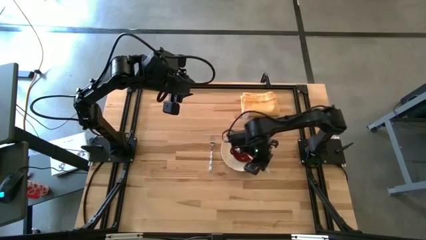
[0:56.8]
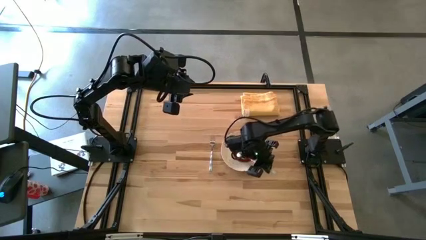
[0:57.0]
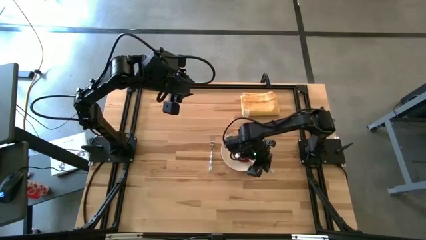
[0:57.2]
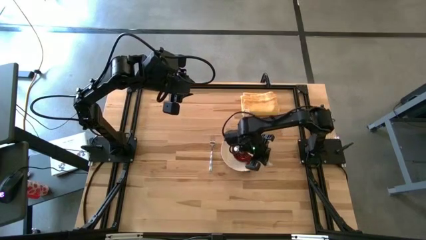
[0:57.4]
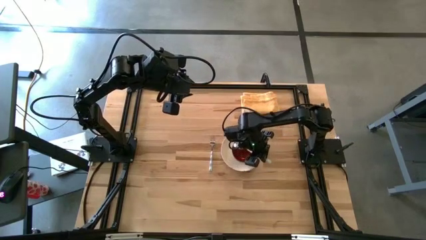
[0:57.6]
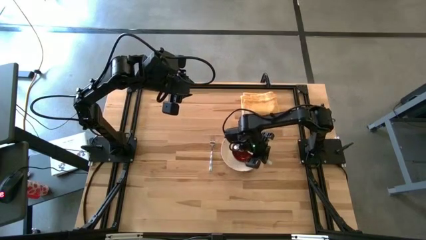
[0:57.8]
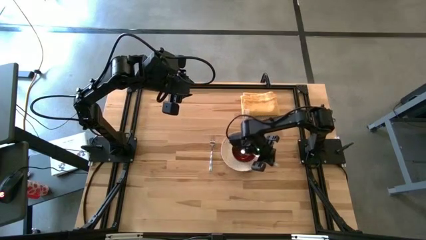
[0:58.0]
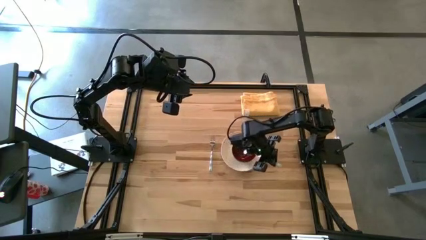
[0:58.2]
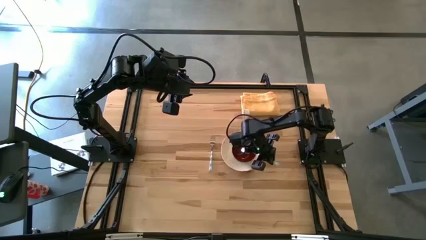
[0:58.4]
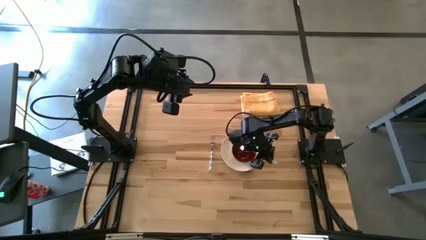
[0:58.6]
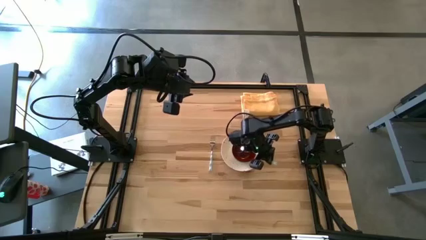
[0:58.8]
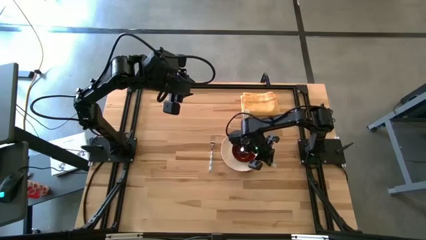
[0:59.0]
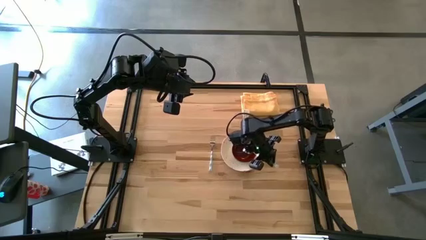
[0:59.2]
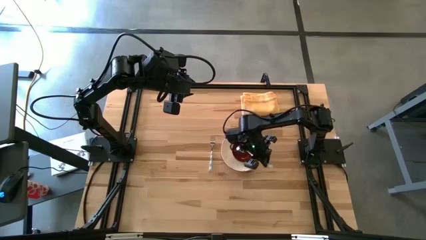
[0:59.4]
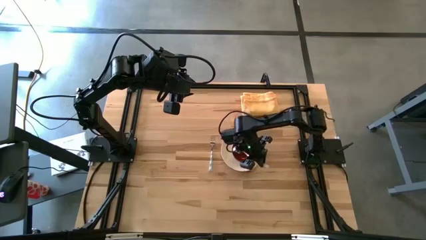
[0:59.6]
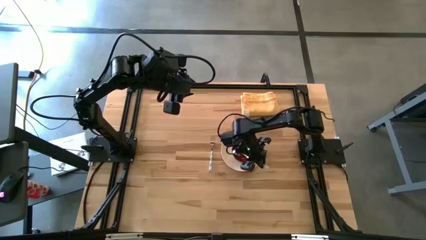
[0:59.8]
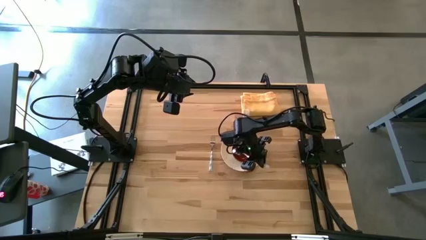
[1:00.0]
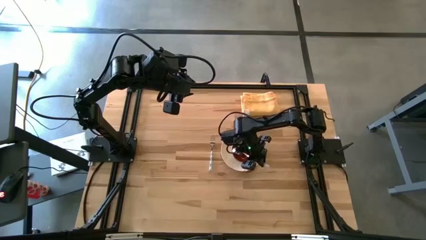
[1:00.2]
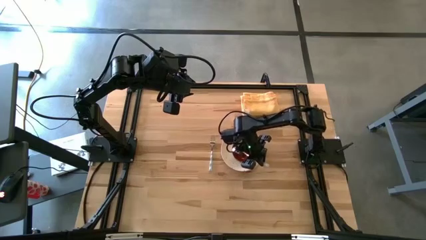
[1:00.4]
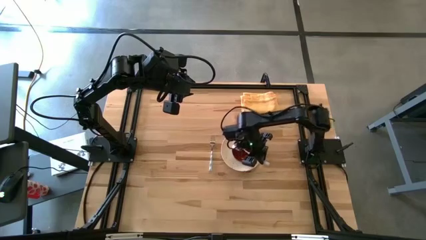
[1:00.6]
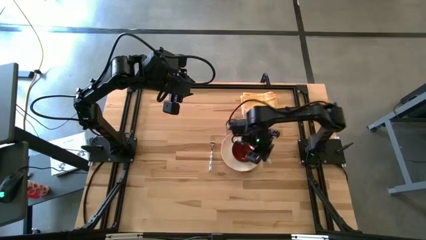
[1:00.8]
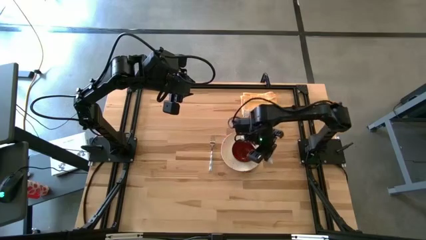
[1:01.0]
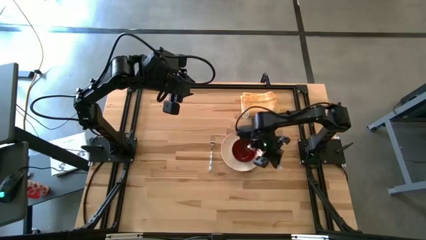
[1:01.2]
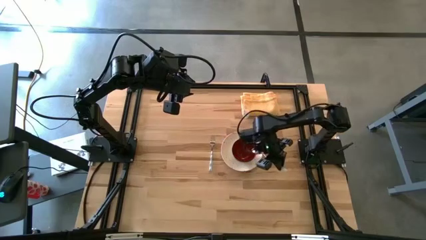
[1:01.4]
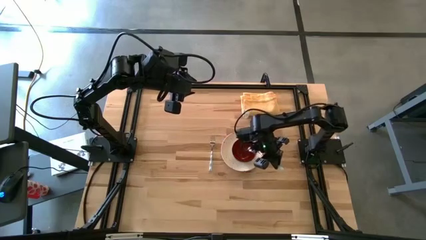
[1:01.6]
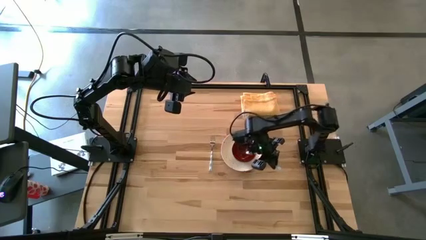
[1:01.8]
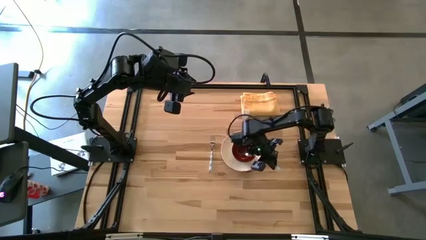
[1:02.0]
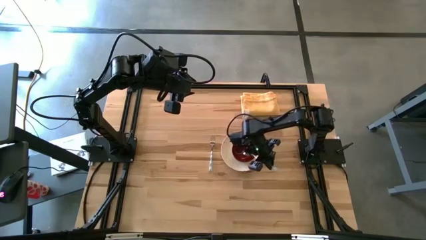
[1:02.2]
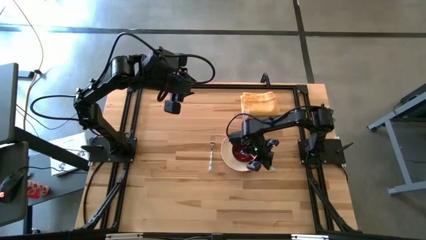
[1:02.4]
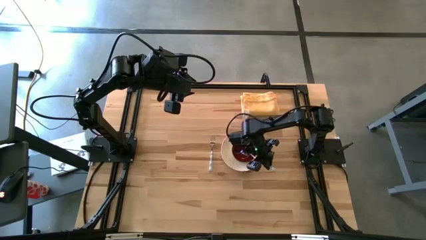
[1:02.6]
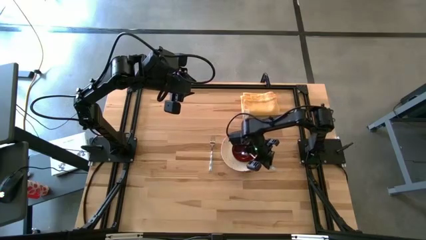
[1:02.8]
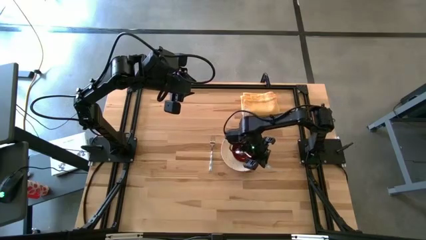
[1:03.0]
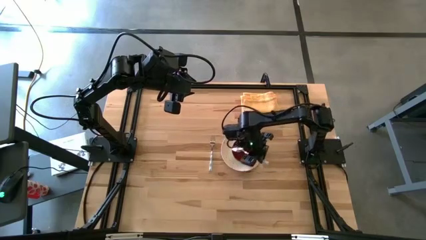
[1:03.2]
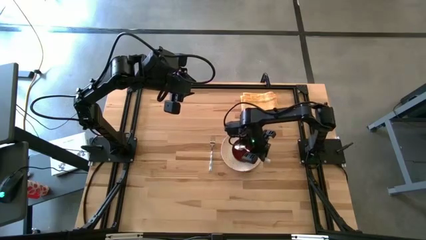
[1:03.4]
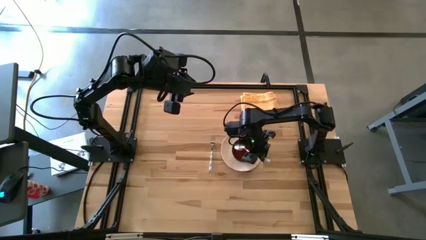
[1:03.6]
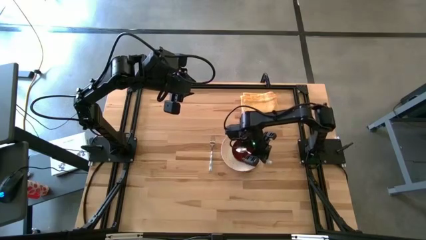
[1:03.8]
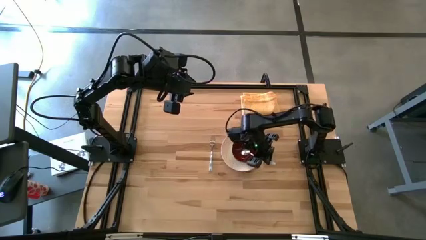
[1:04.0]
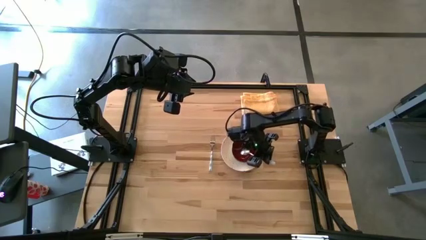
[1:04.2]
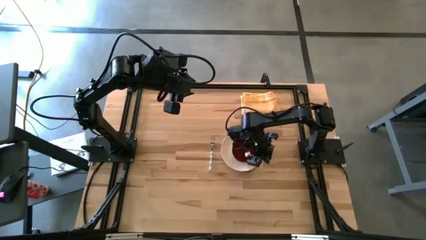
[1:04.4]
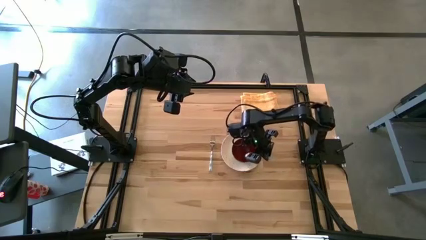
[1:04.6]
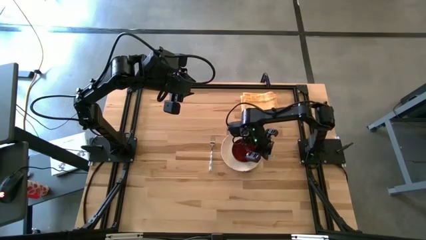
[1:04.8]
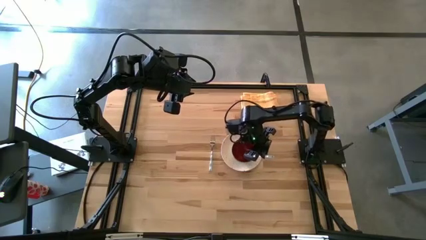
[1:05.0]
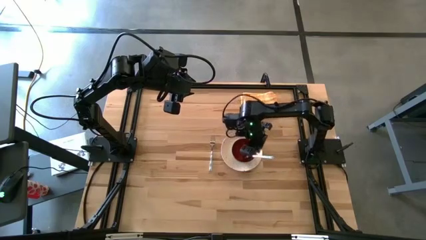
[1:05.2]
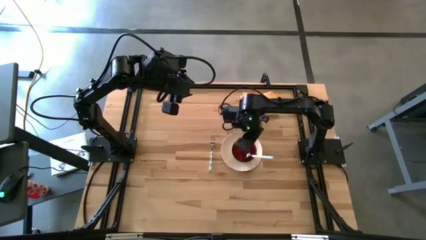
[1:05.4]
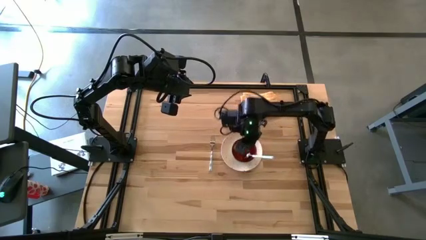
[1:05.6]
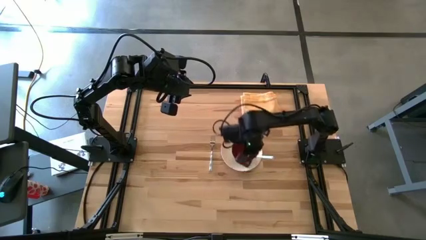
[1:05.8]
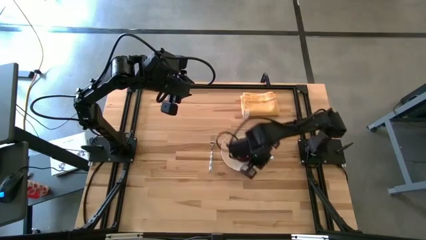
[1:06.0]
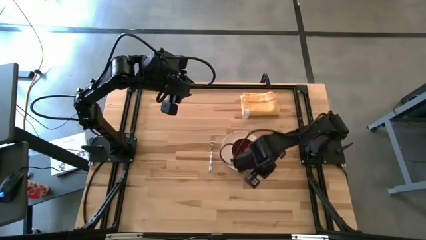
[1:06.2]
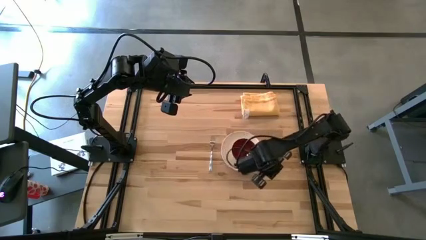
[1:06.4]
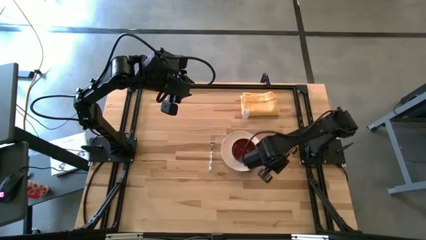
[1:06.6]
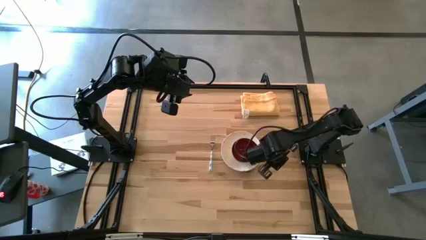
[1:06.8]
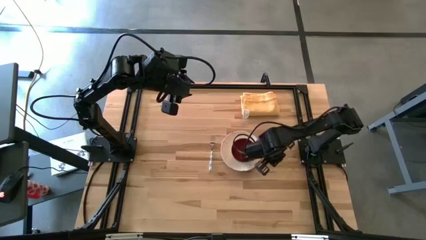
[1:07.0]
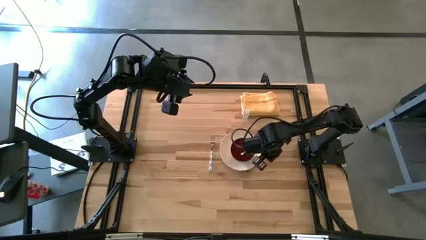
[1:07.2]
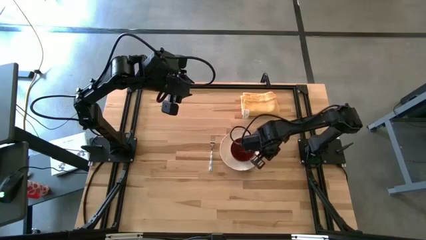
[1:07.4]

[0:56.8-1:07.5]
Task: Set table place
Put the spoon into the black bowl

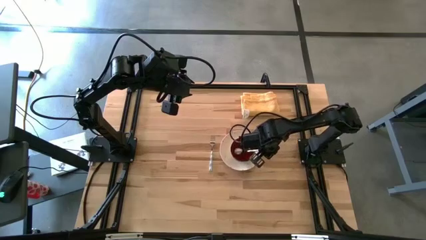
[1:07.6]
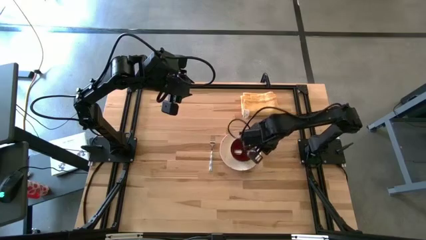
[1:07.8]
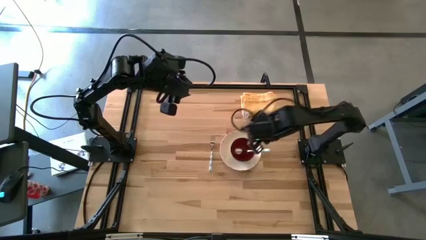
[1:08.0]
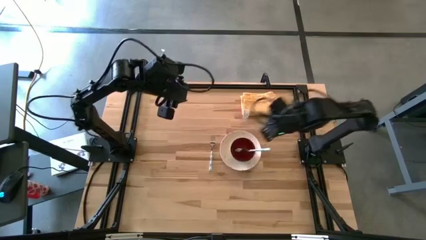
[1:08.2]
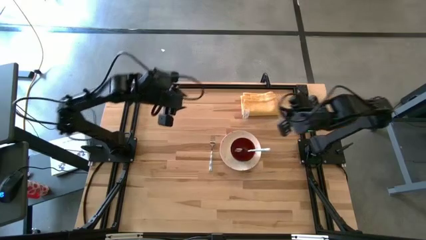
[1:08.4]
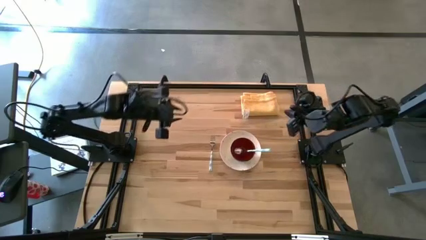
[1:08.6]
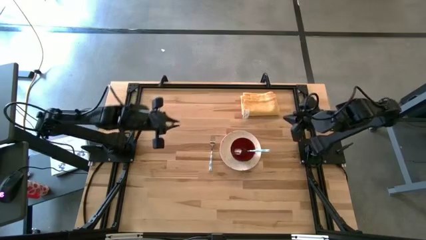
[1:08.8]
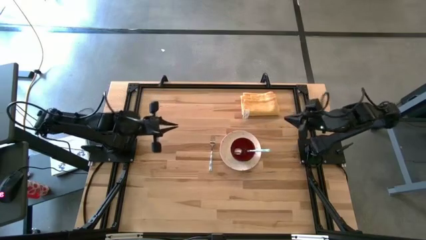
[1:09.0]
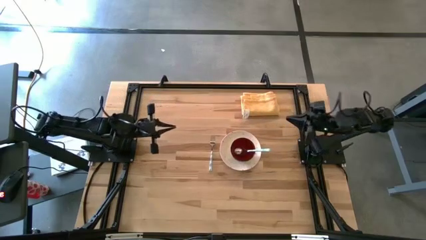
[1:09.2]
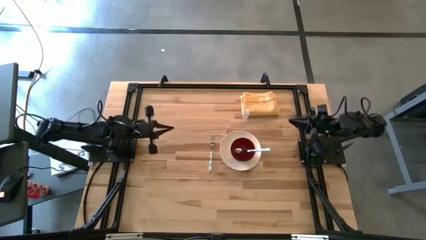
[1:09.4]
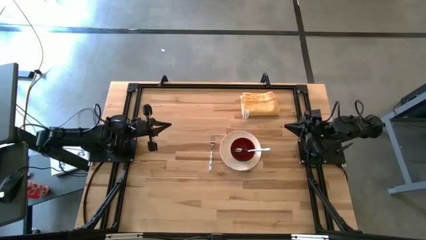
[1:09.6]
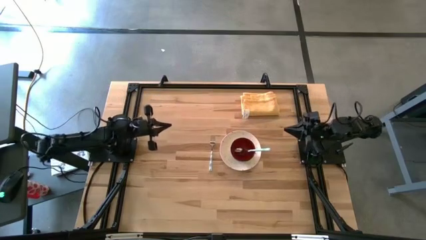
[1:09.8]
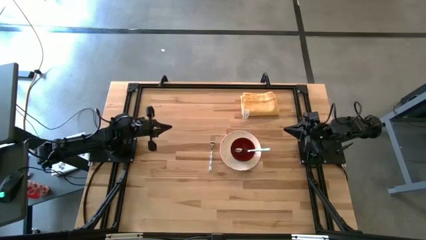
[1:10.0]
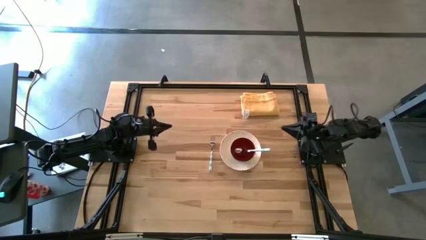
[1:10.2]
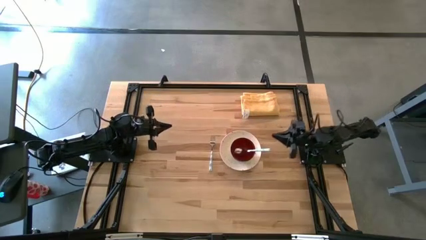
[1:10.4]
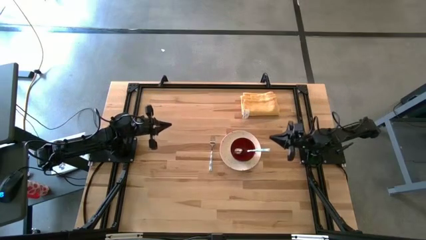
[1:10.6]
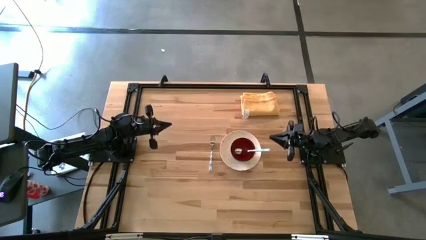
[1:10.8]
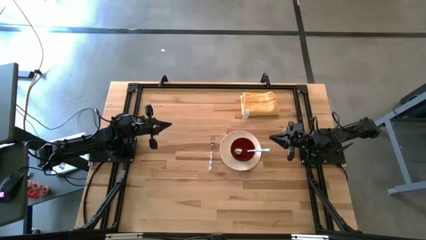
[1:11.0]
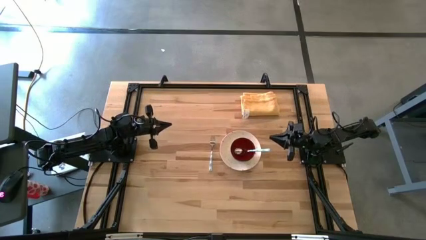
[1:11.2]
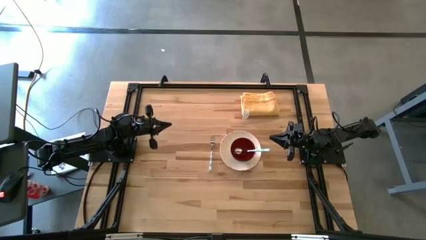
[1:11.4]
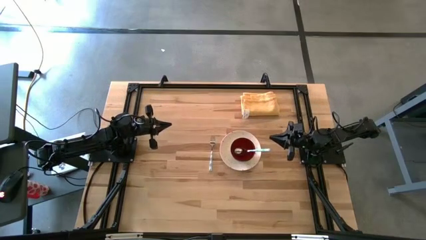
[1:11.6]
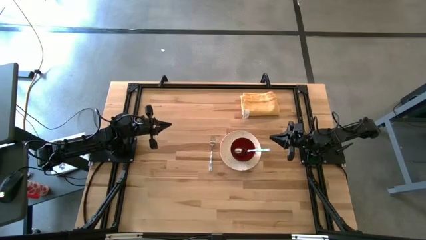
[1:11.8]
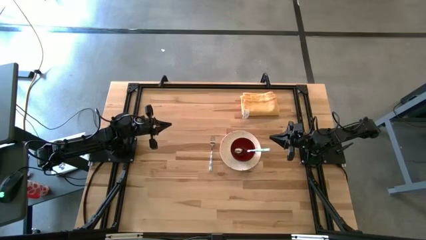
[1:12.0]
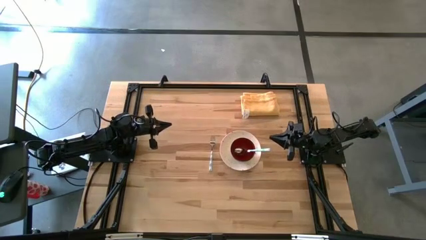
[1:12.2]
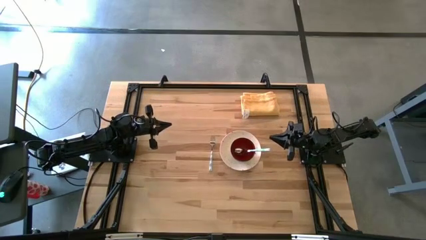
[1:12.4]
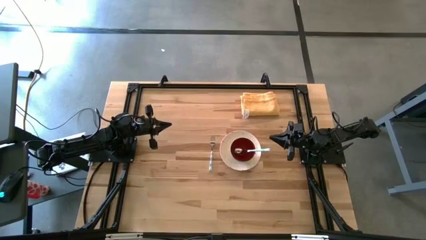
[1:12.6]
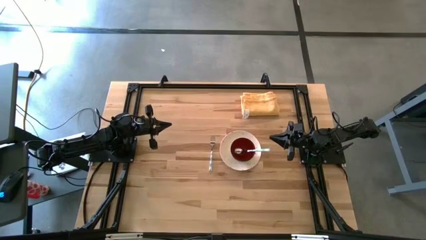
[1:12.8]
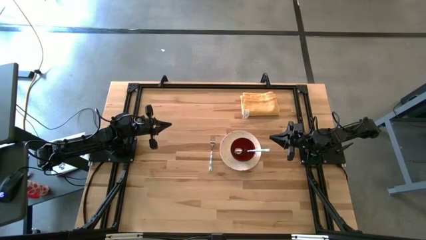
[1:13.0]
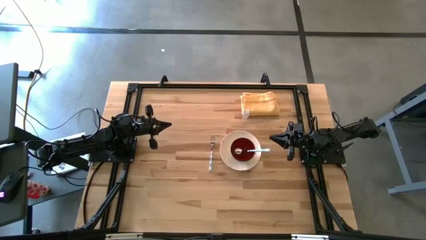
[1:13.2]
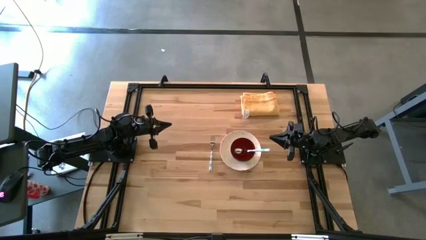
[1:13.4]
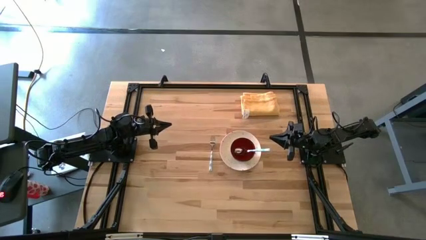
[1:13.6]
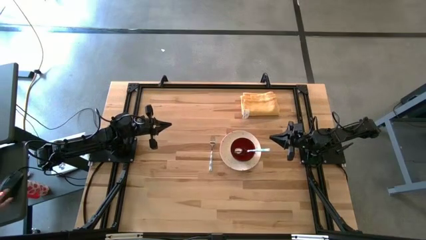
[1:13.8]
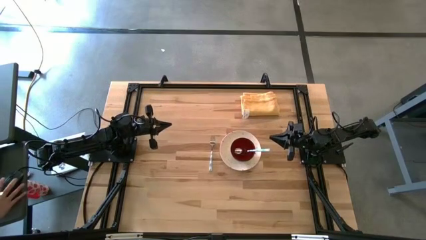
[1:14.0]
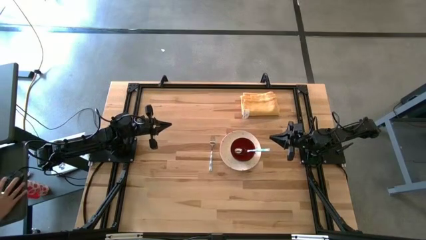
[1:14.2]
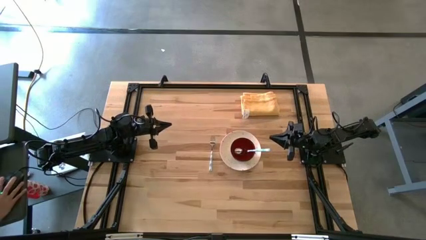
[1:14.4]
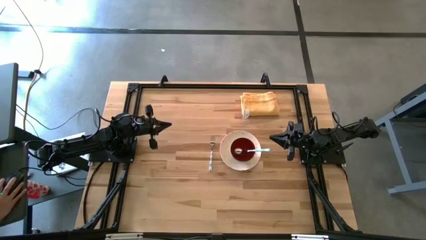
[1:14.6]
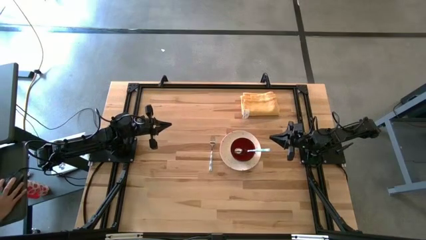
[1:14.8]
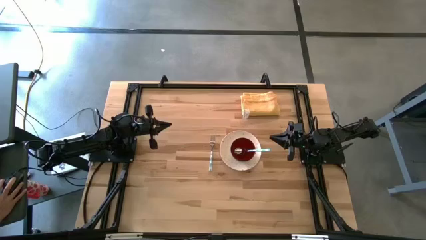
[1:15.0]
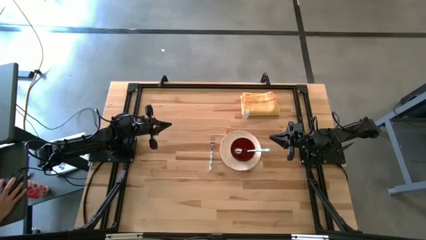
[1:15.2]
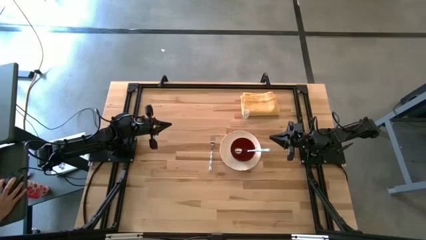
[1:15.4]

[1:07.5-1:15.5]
Return to Home Position
